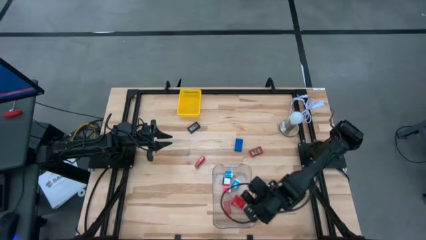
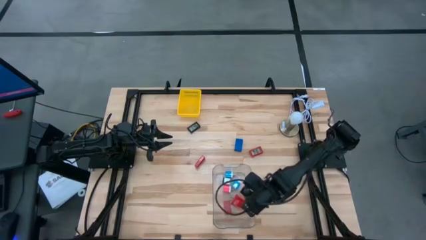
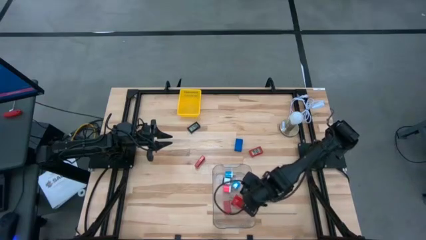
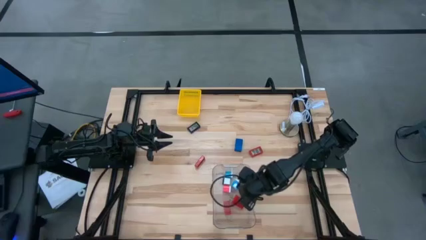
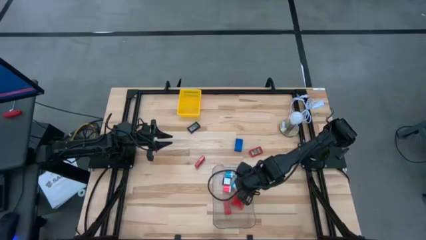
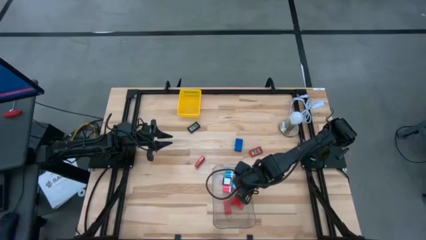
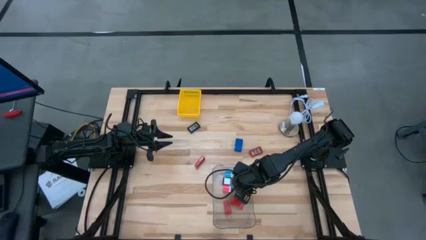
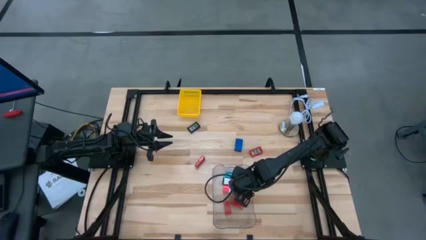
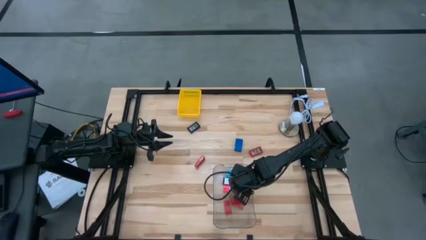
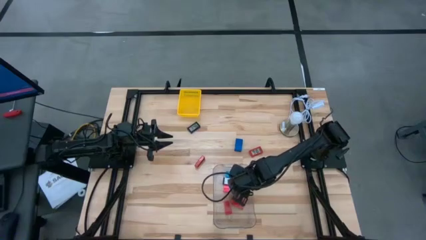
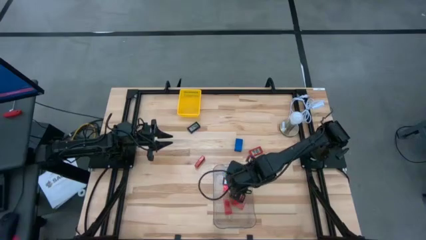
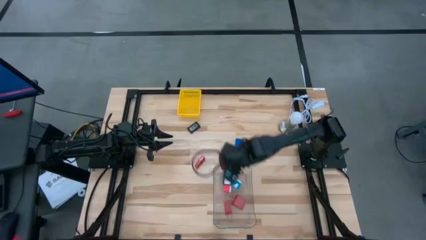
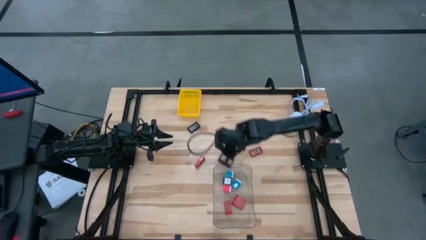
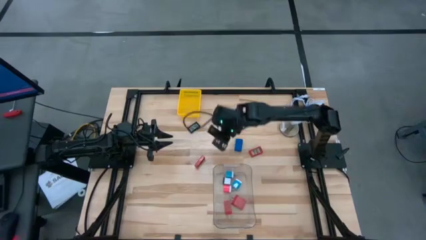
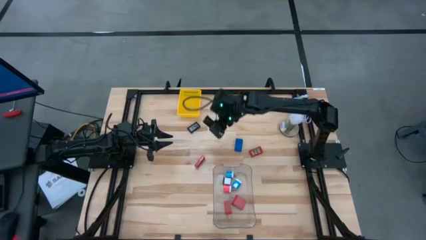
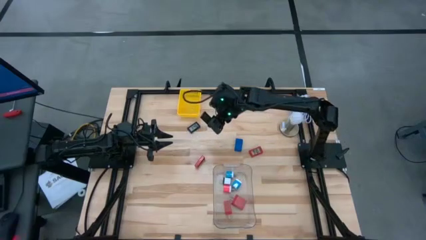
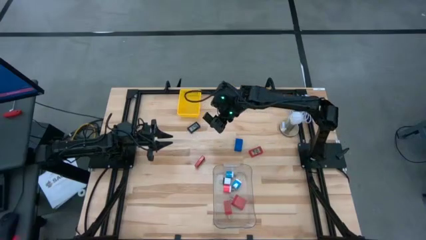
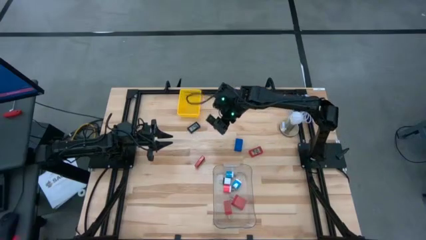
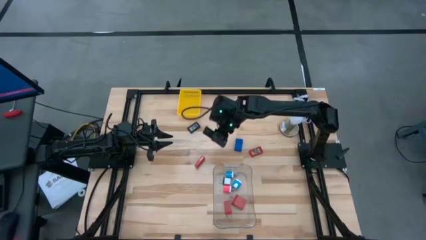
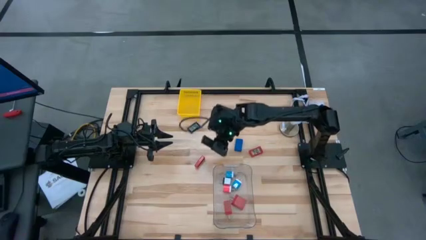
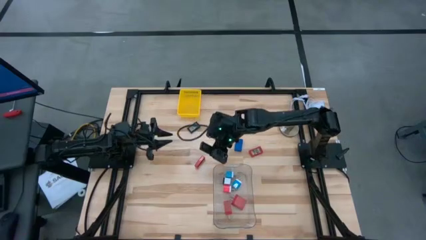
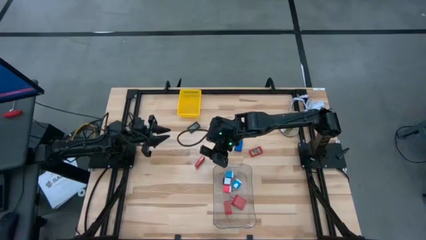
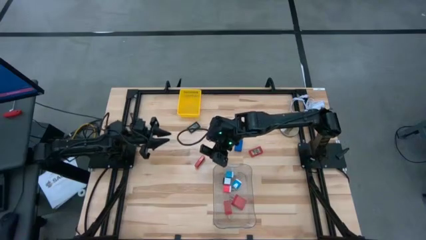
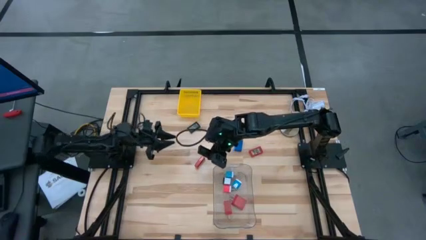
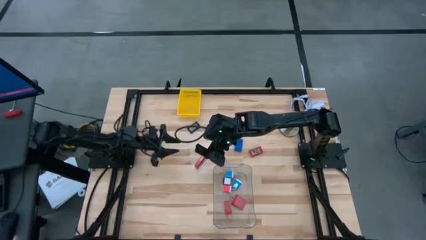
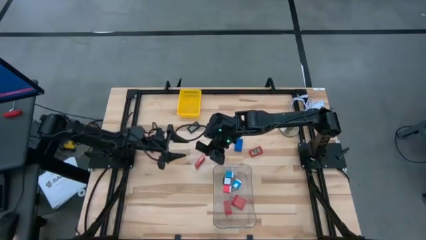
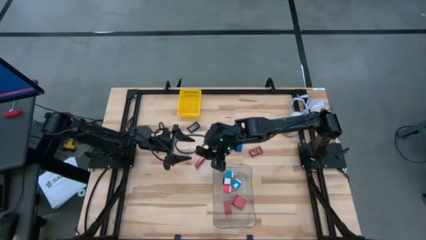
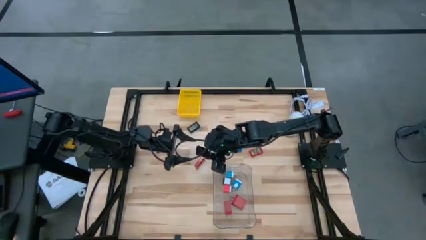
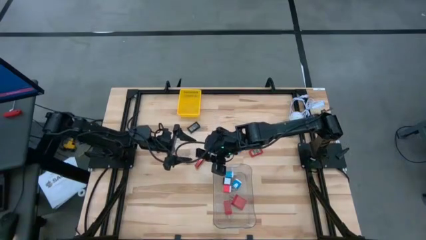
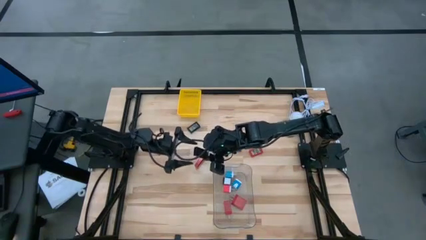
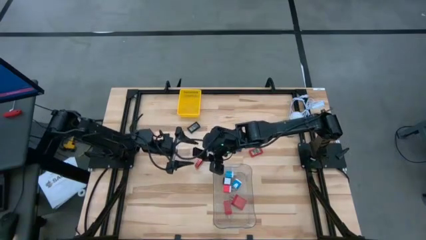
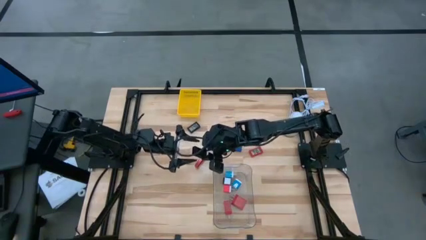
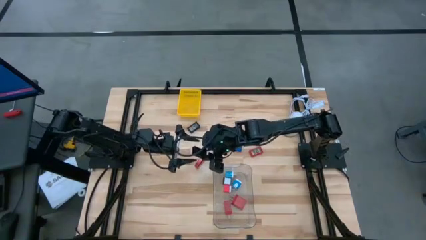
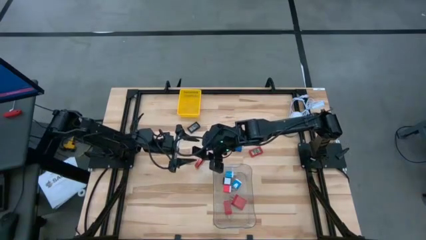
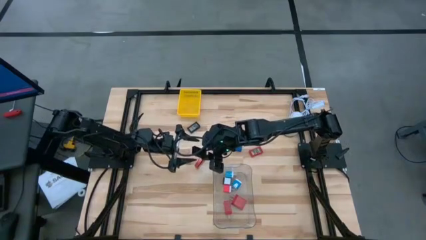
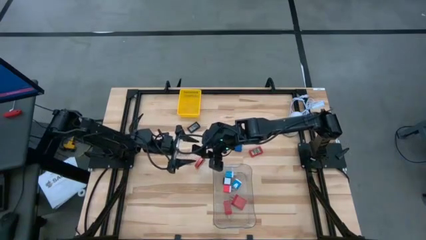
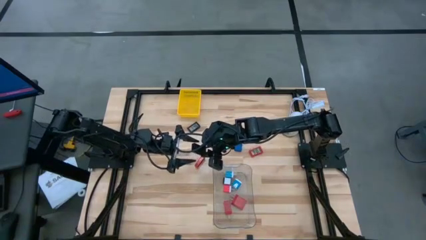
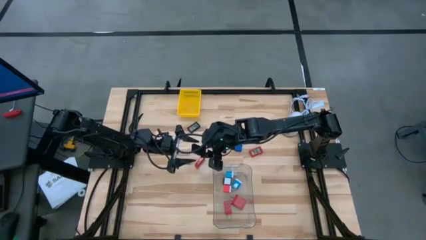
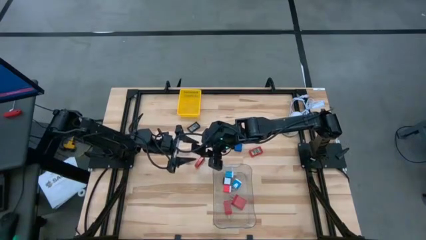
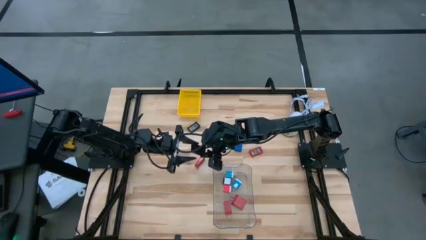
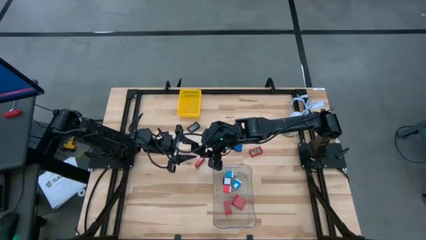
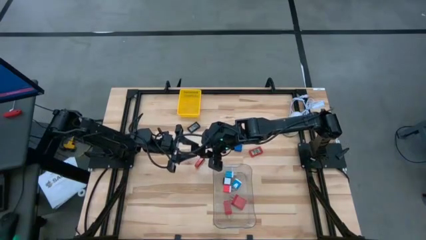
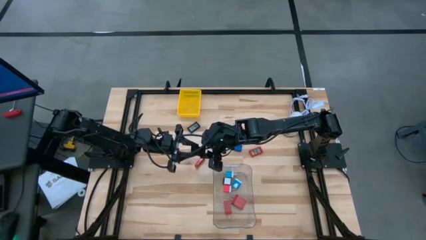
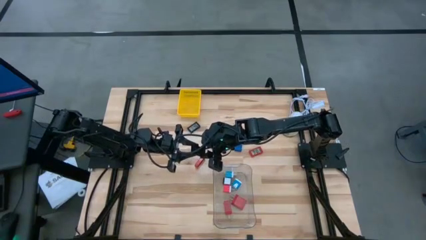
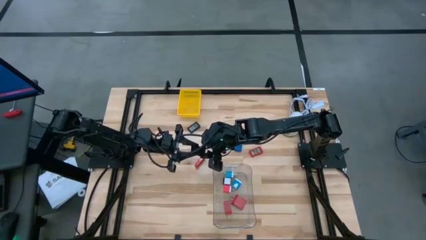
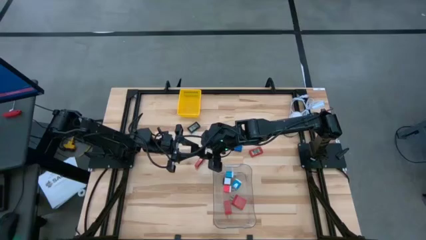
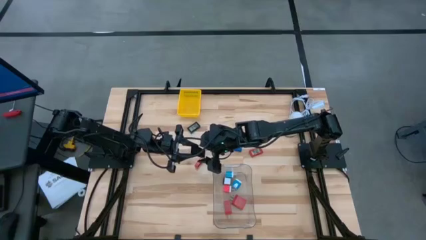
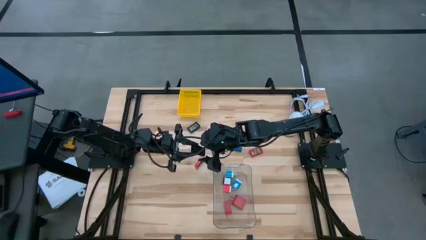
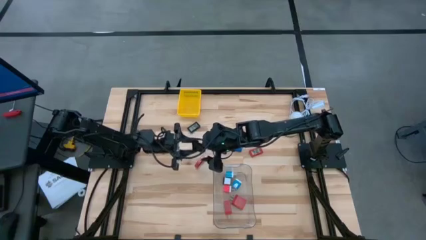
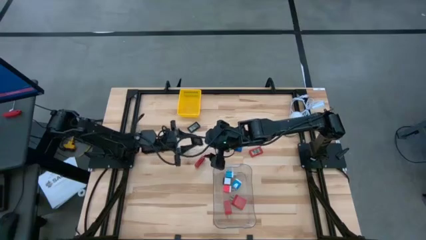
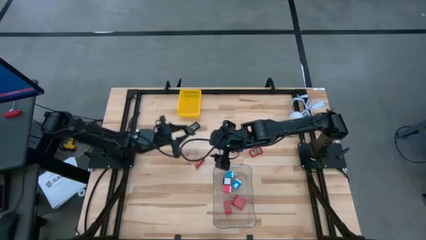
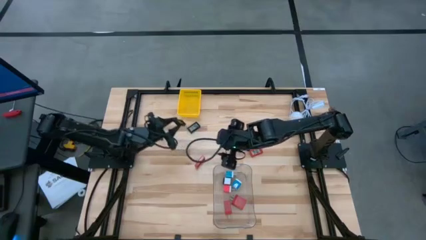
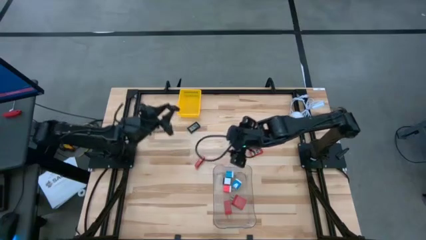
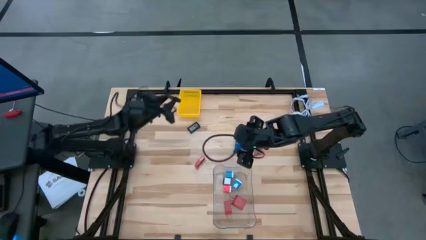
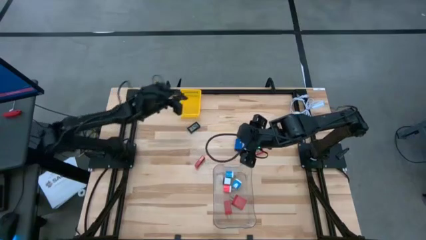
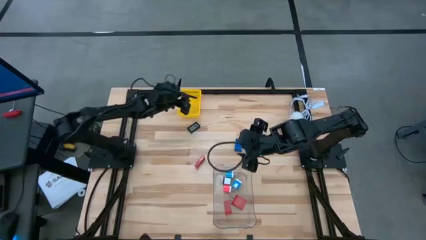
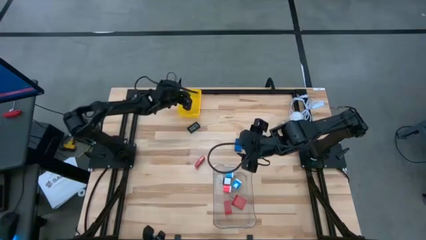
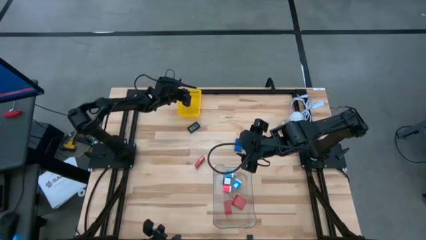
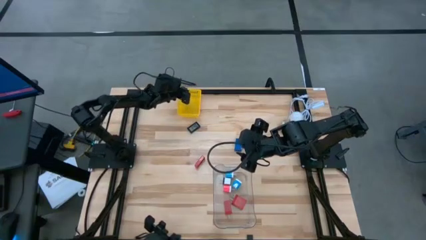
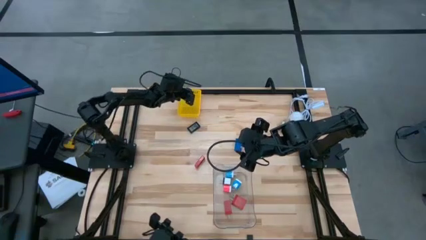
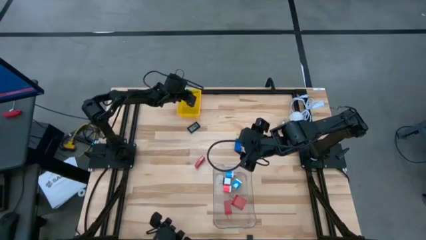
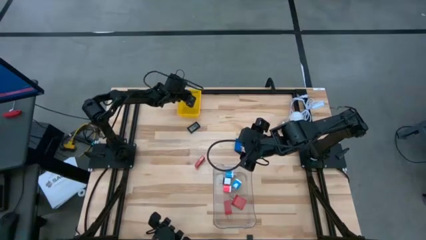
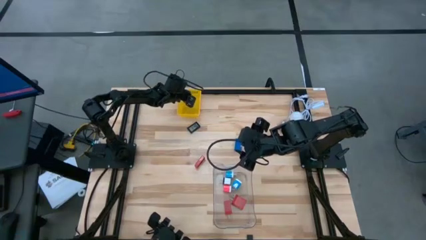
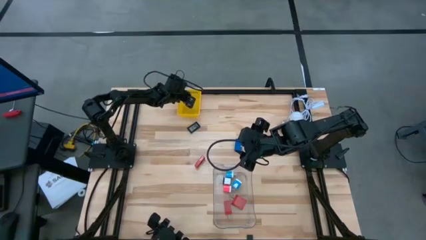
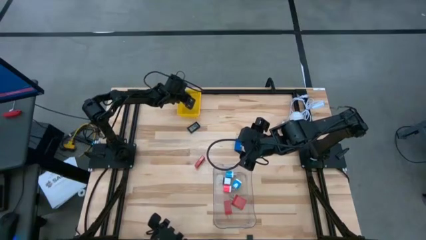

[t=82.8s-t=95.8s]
Task: Pick & Place Office items
Put the right black digital clock into the yellow bin
